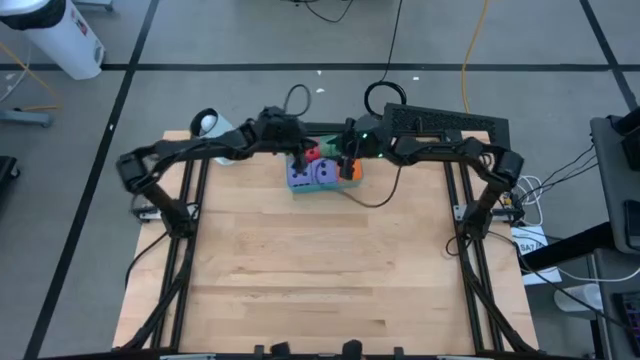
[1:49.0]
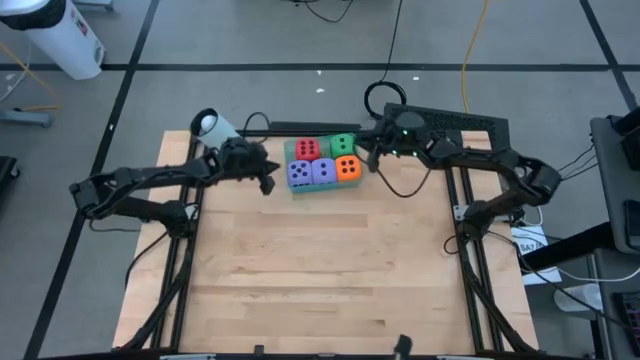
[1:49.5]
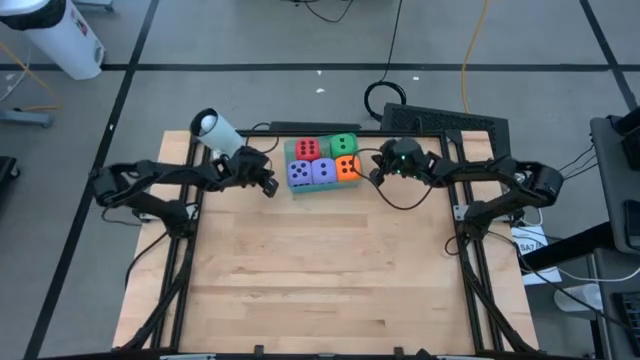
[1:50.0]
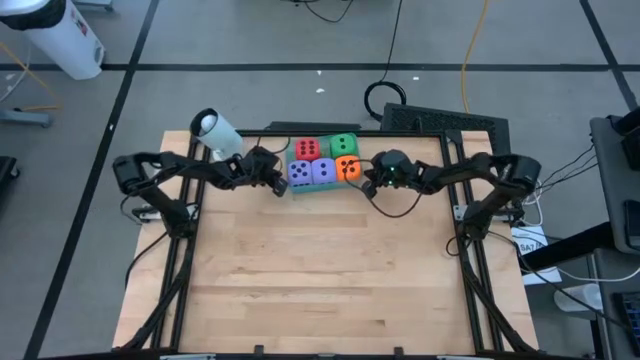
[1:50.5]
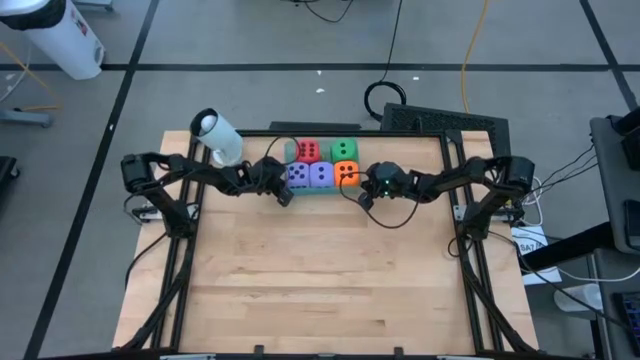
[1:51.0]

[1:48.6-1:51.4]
Task: Pick & Place Dice
Adjust the blue bin

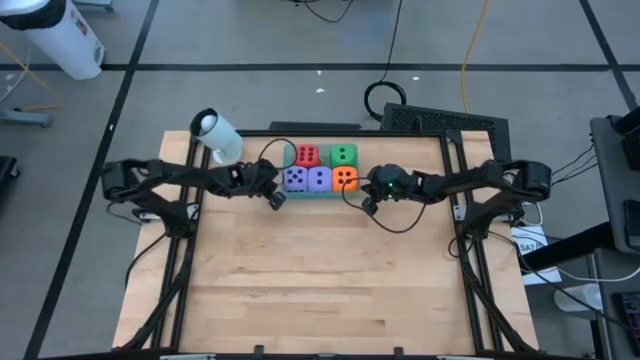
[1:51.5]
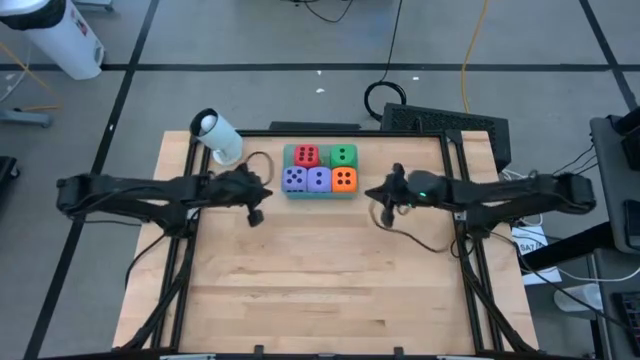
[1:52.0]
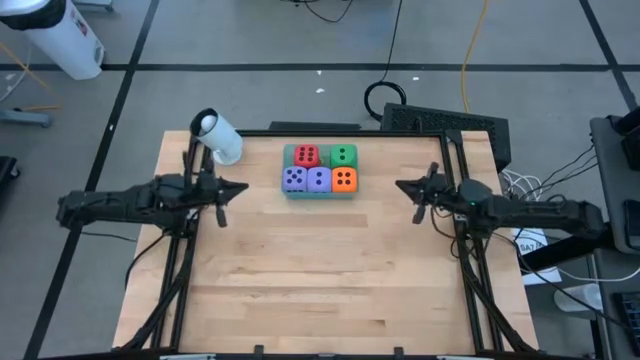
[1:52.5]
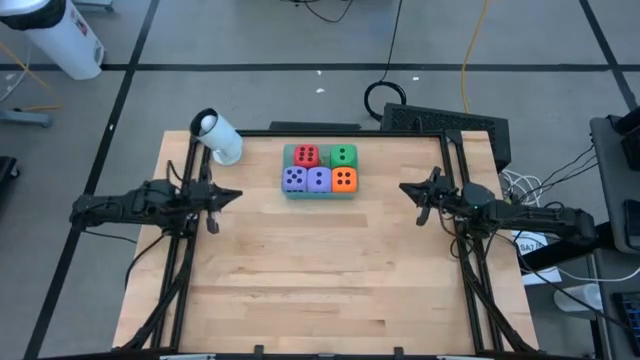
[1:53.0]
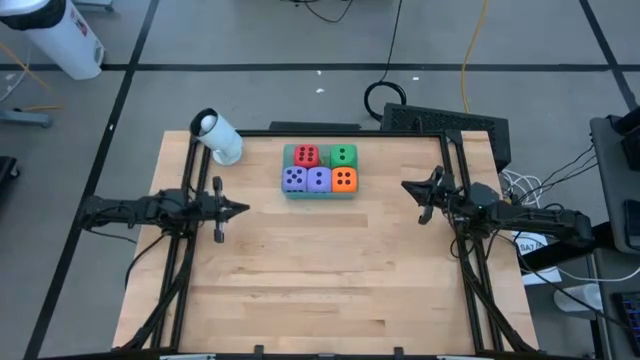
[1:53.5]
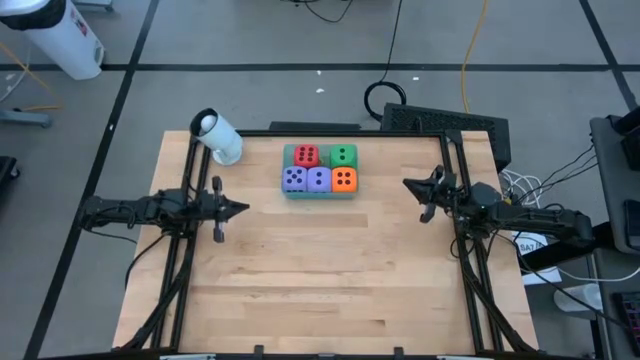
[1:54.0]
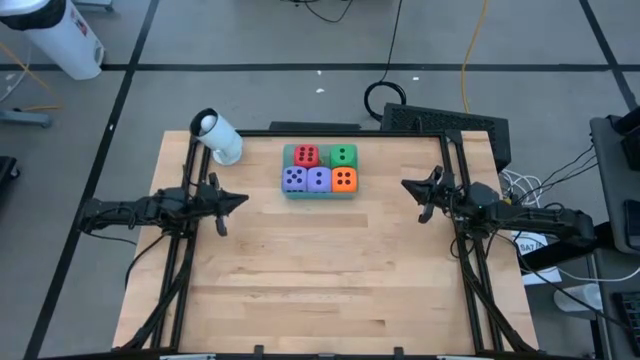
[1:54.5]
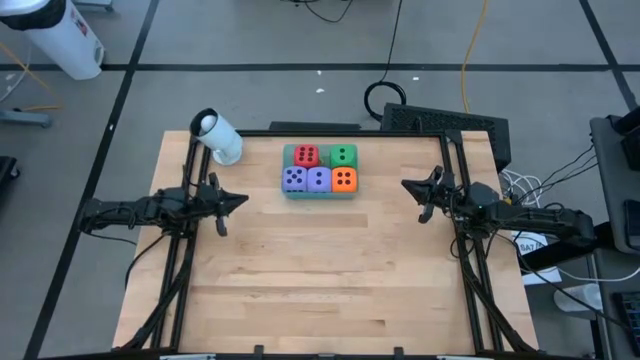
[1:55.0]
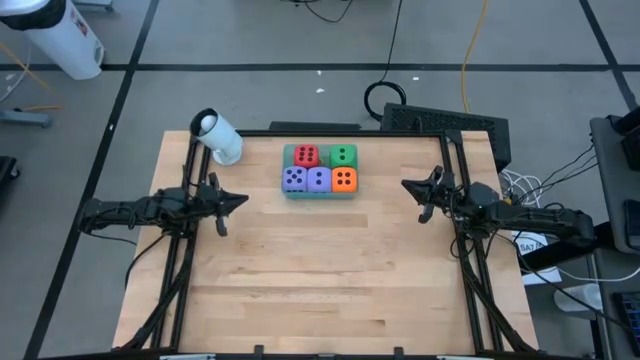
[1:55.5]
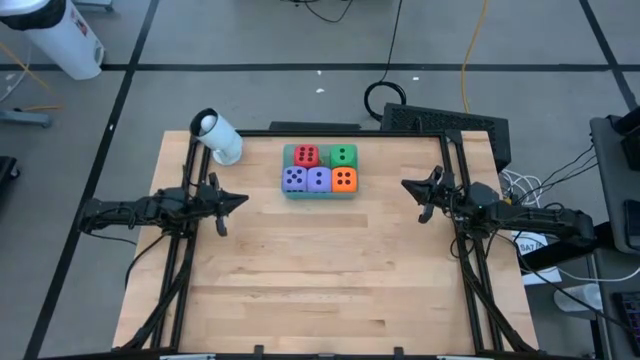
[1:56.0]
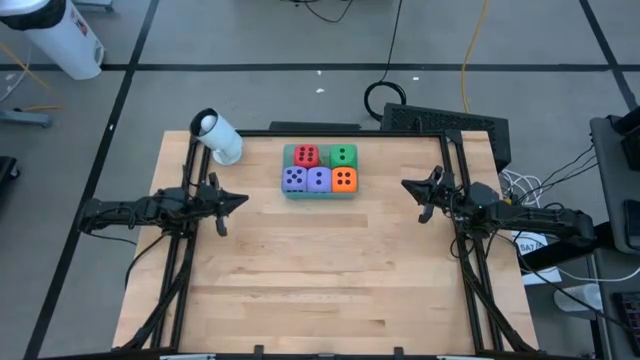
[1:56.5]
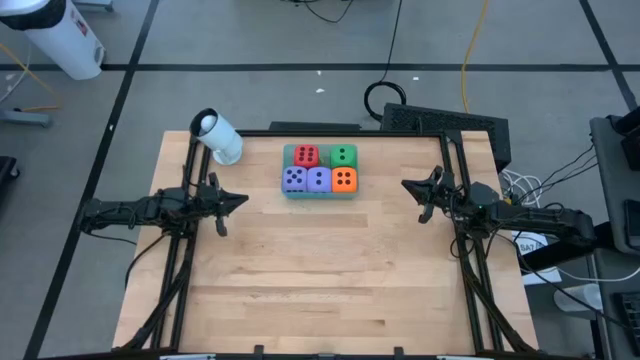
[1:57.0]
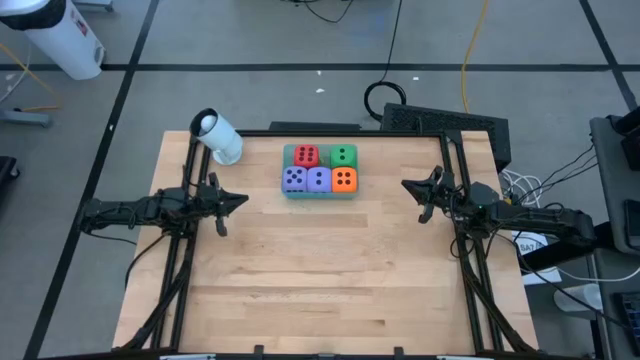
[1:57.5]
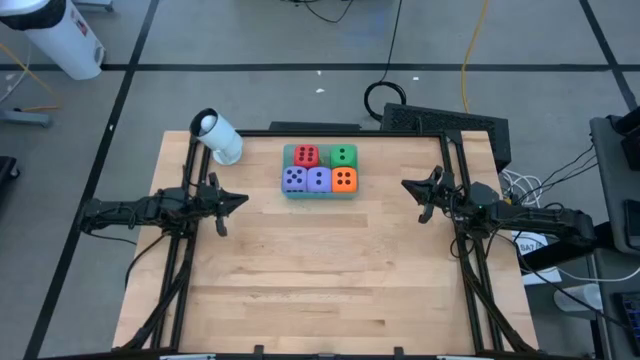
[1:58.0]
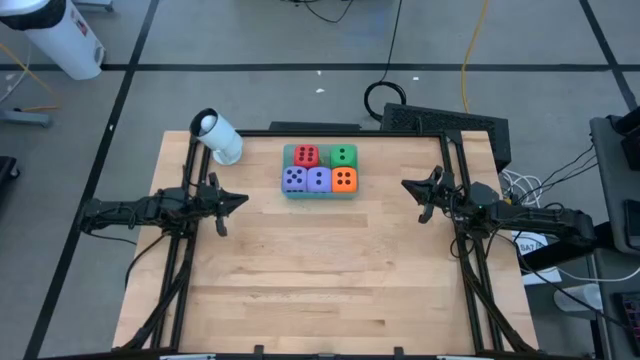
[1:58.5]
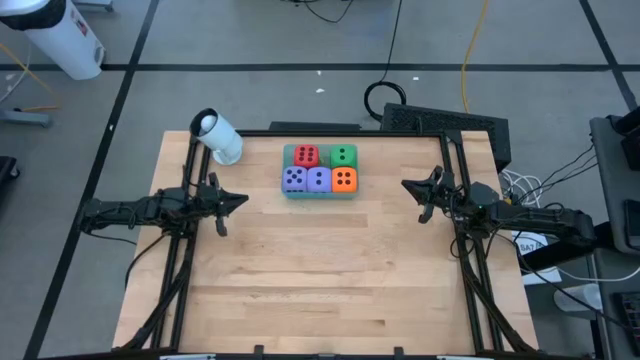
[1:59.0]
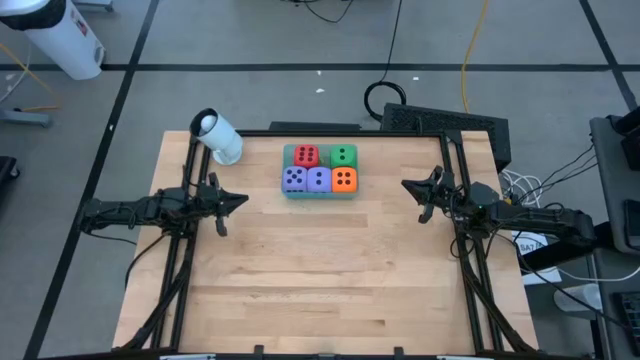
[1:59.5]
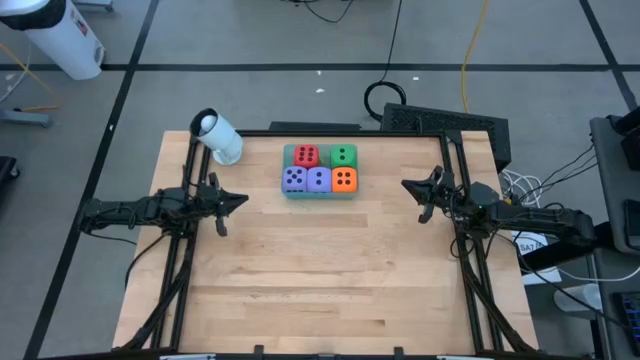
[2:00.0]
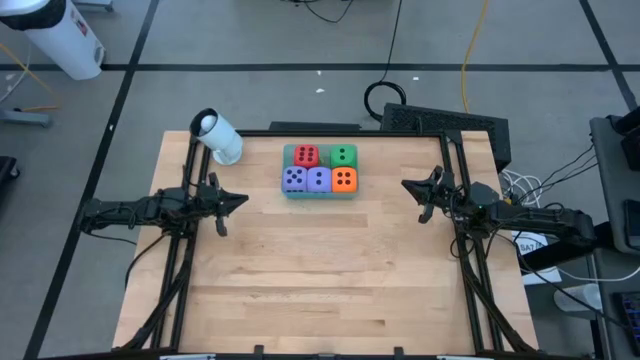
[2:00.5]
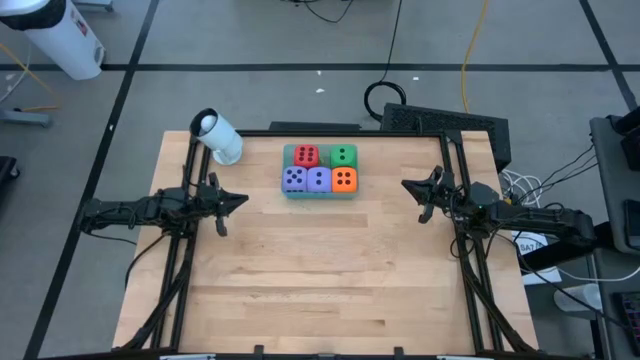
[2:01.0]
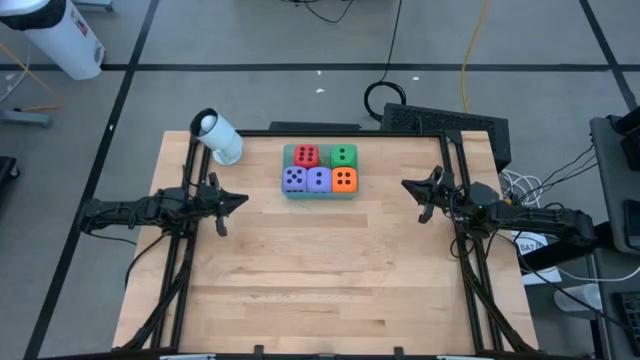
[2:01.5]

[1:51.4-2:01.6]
Return to Home Position

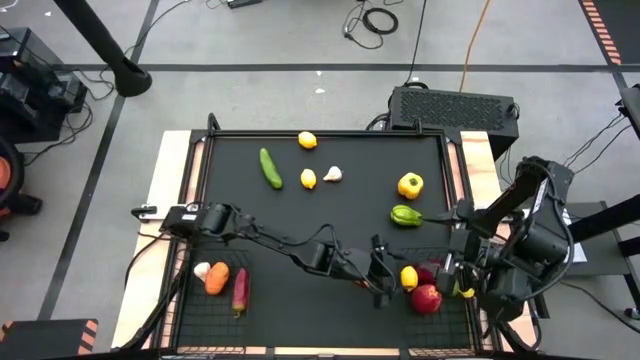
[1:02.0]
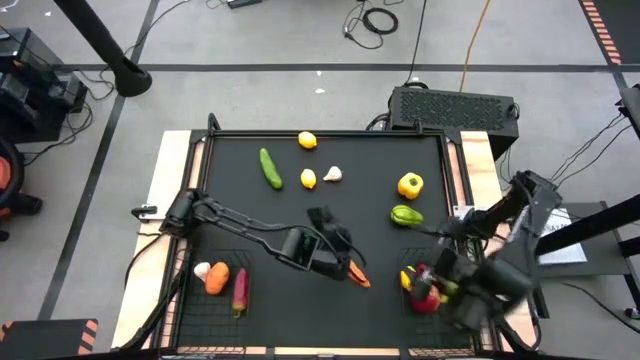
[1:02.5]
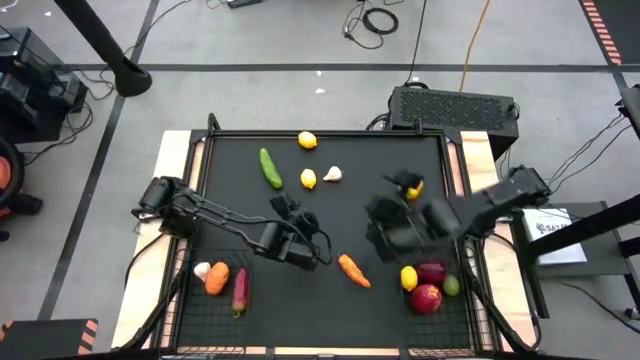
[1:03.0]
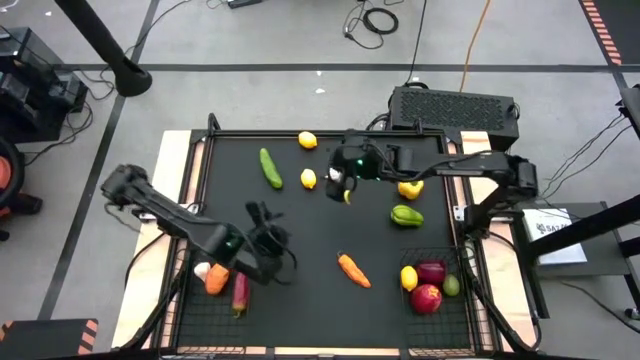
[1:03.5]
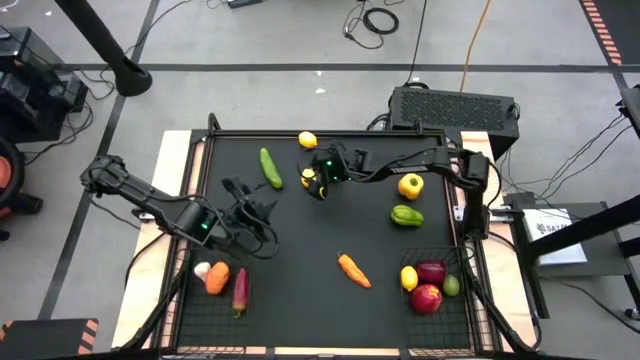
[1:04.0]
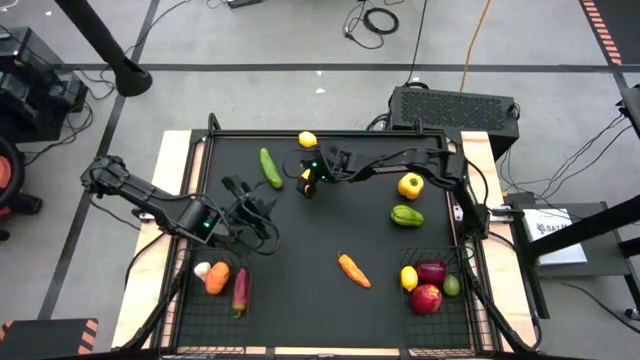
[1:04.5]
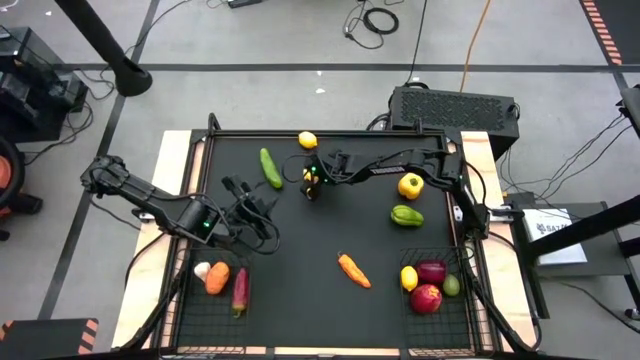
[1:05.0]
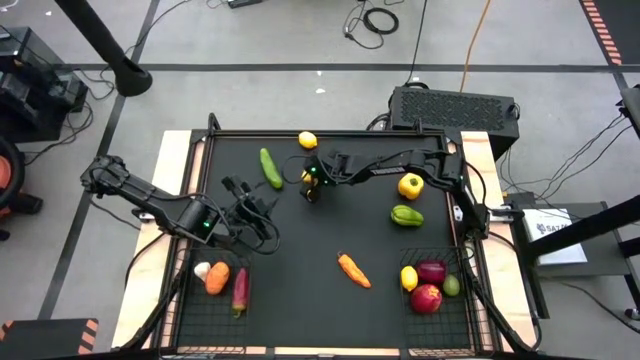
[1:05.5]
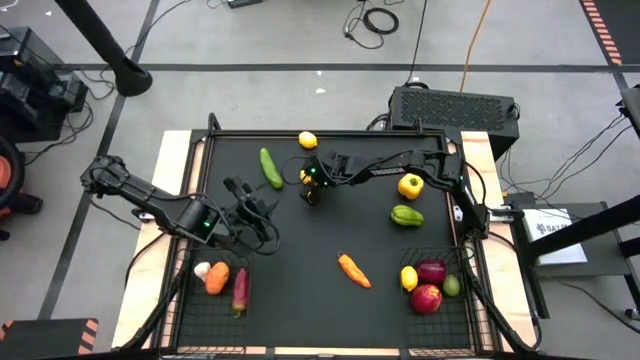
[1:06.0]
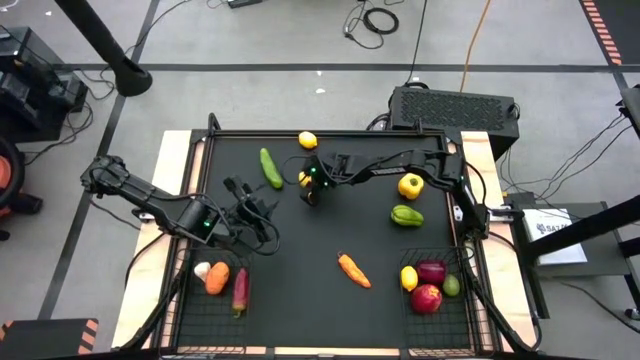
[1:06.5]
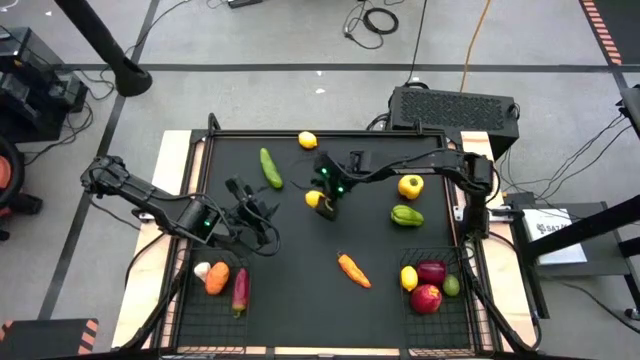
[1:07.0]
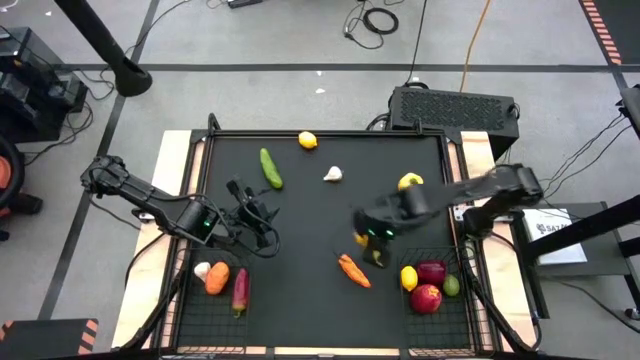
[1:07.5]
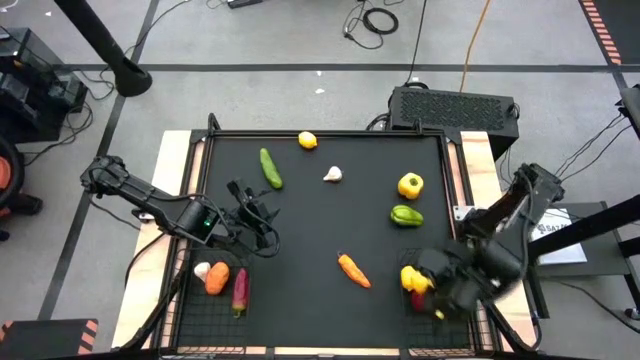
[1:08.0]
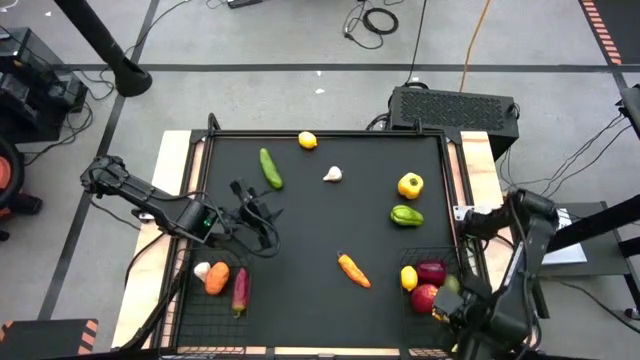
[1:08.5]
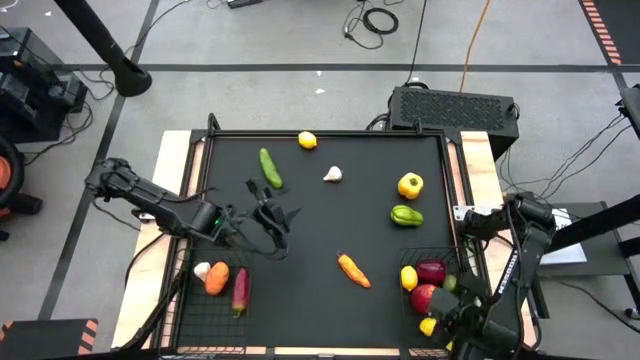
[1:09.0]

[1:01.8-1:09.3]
Task: Sort produce into baskets
Put the bottom lemon into the bottom right basket
